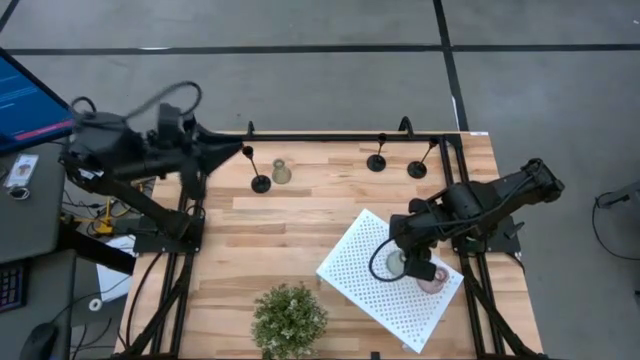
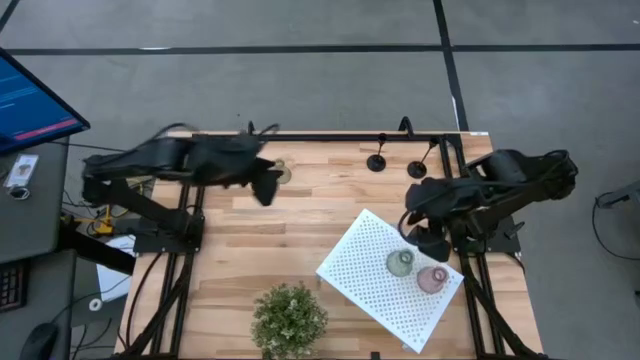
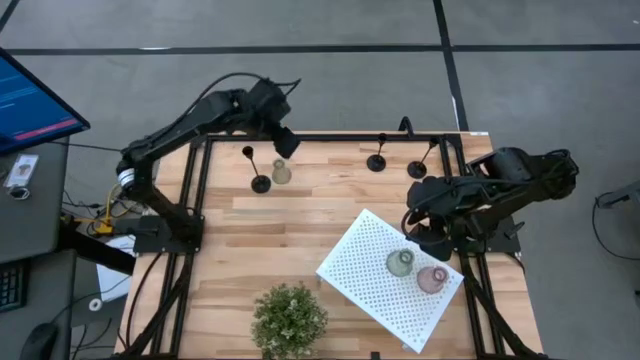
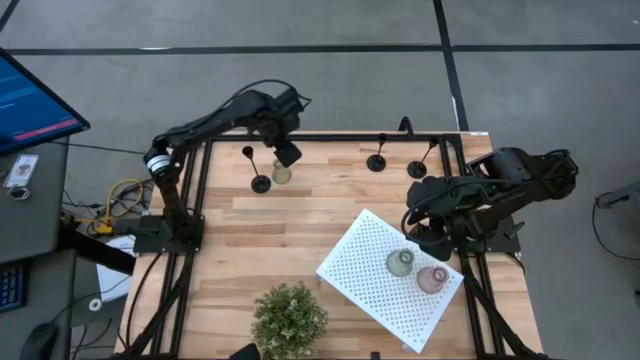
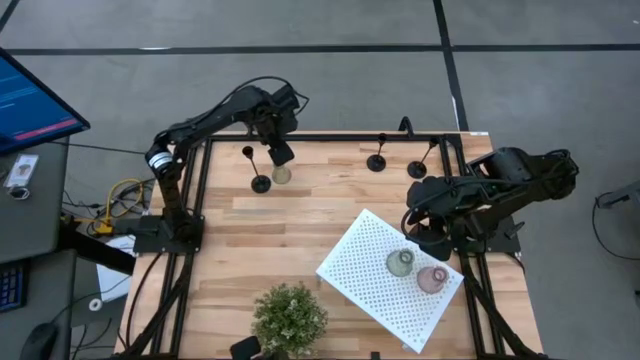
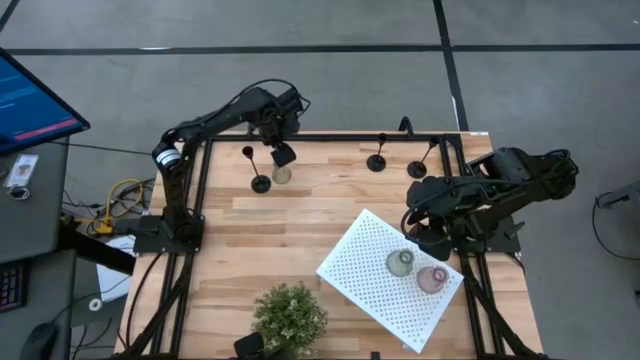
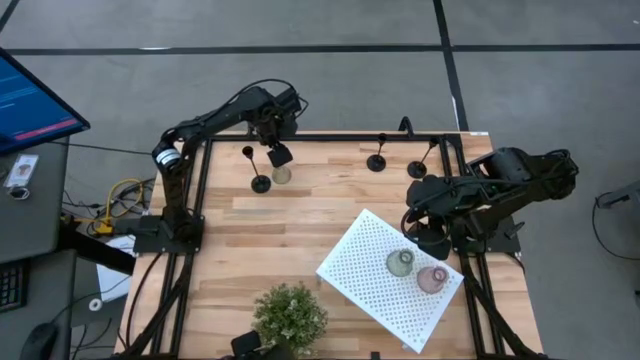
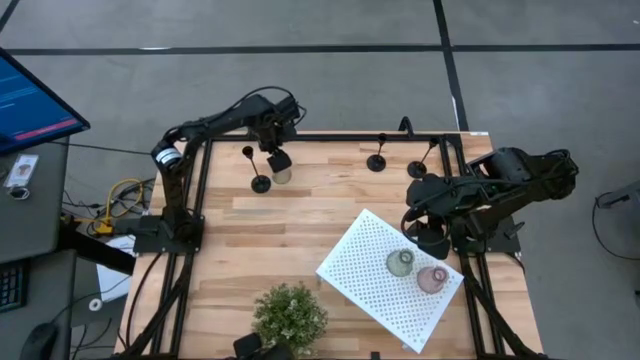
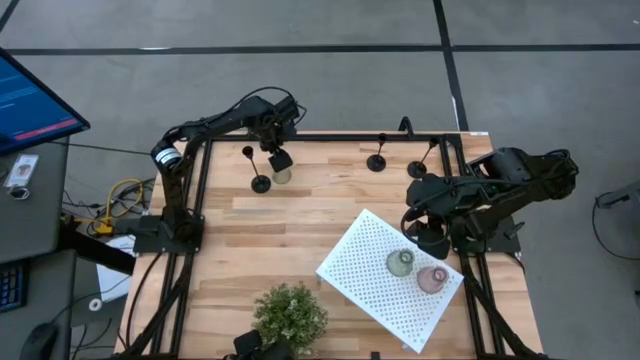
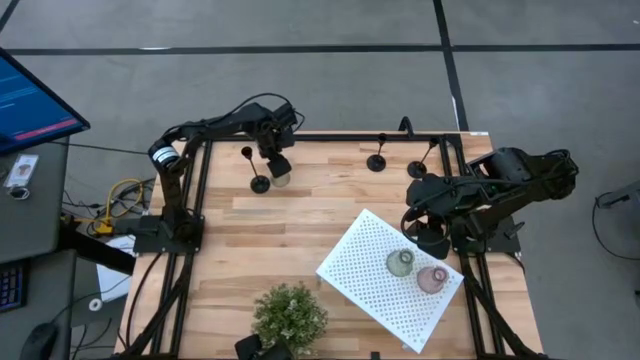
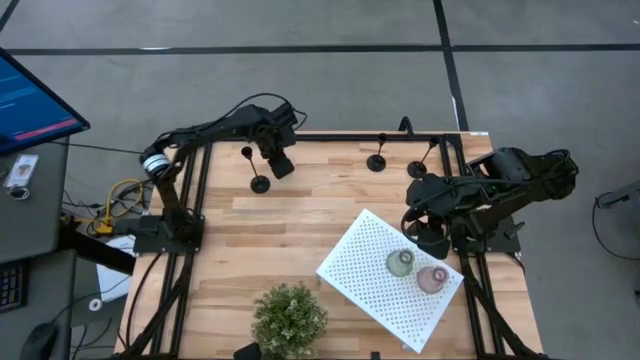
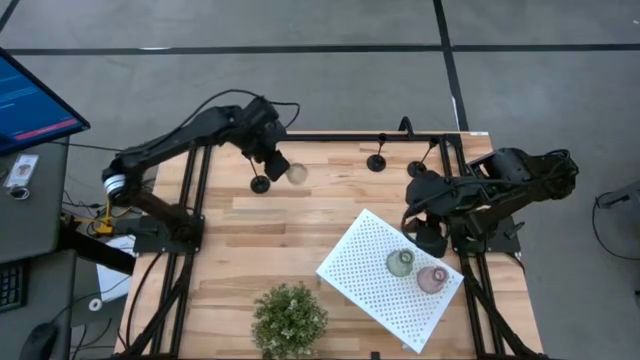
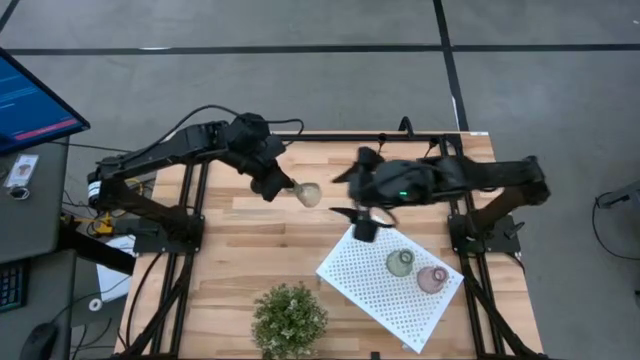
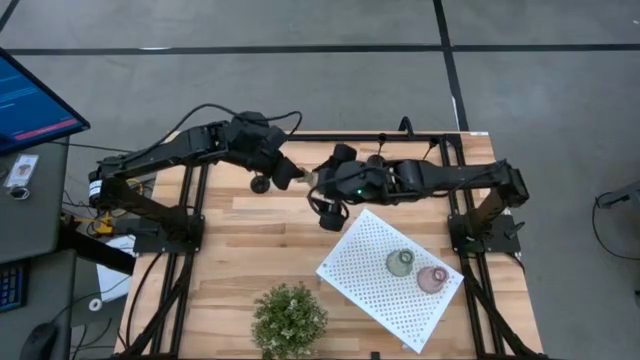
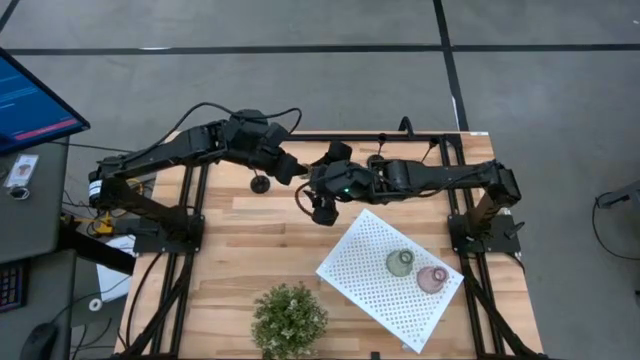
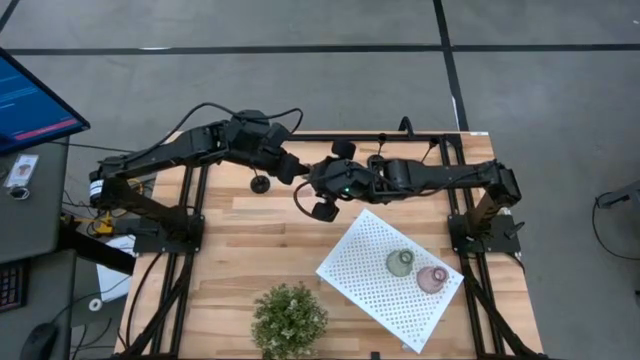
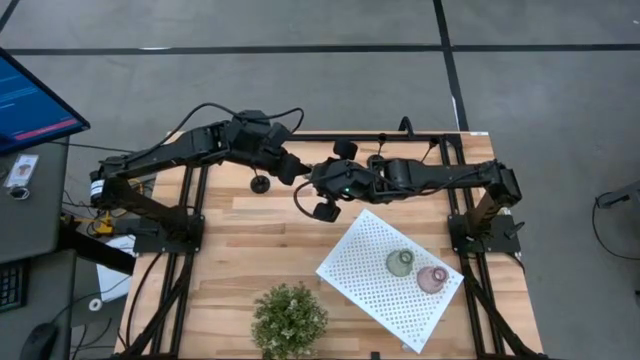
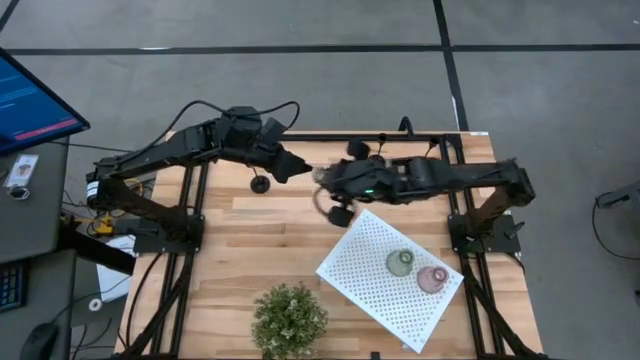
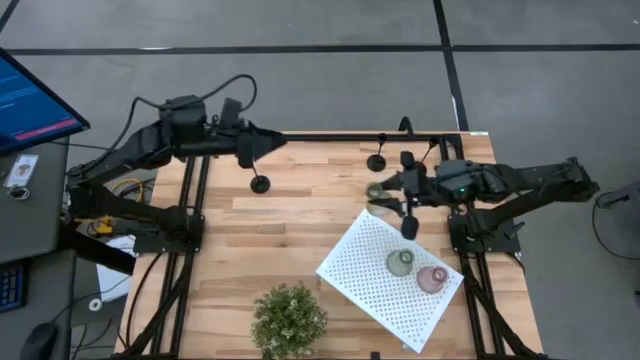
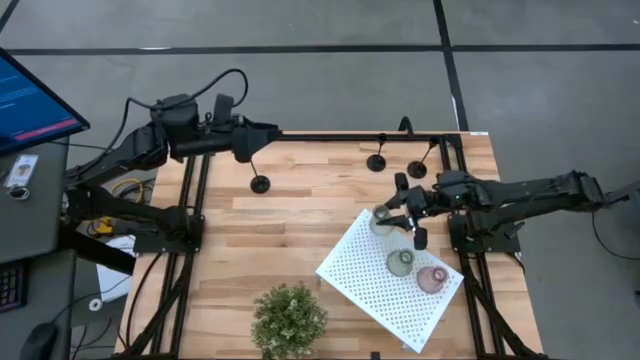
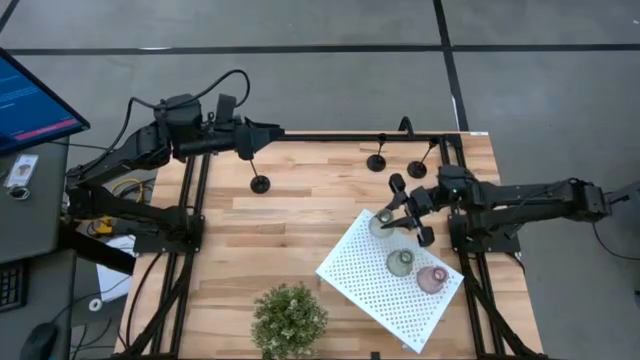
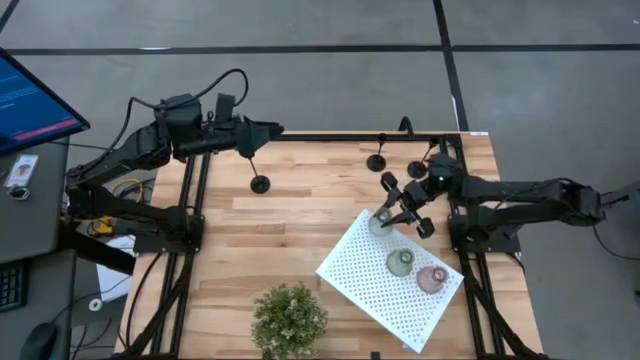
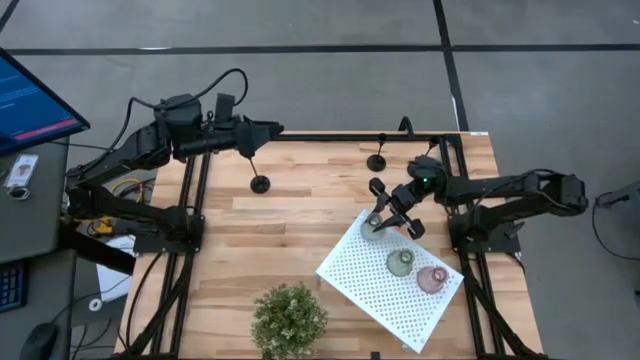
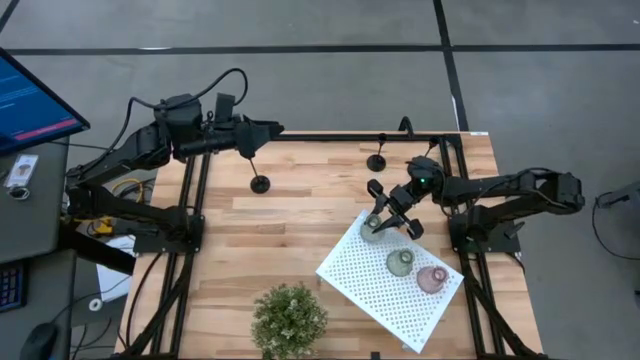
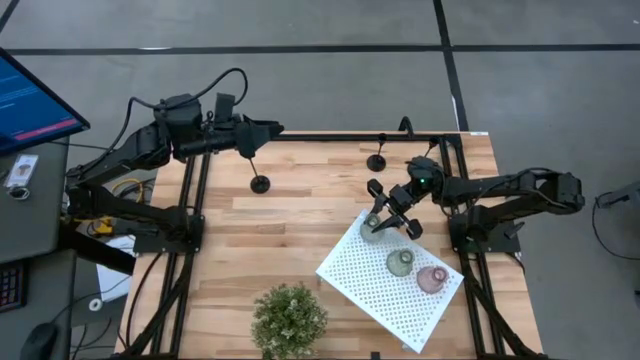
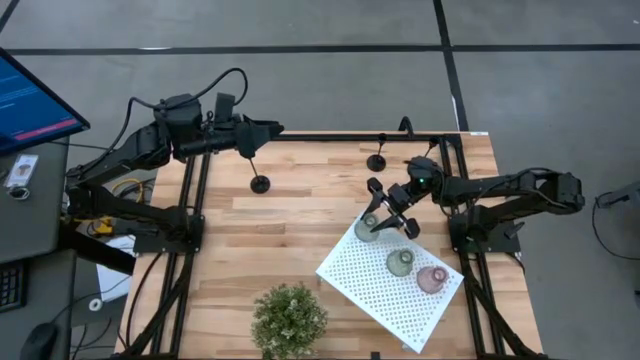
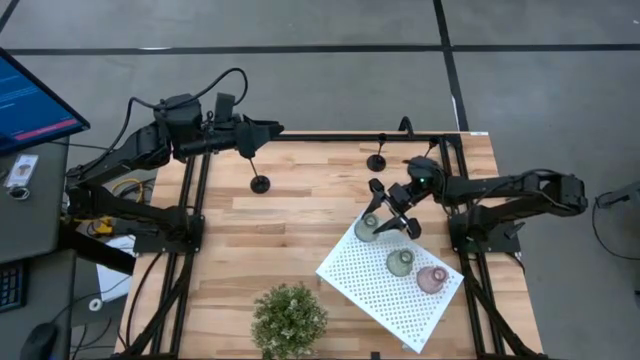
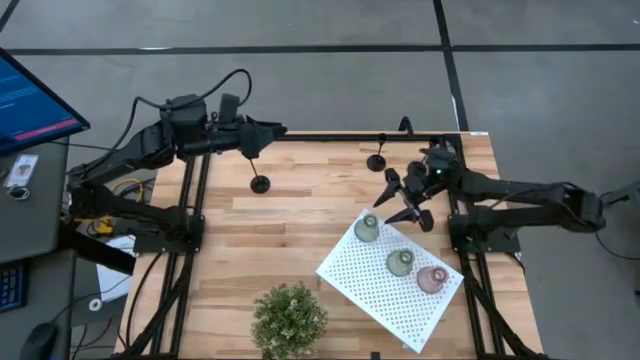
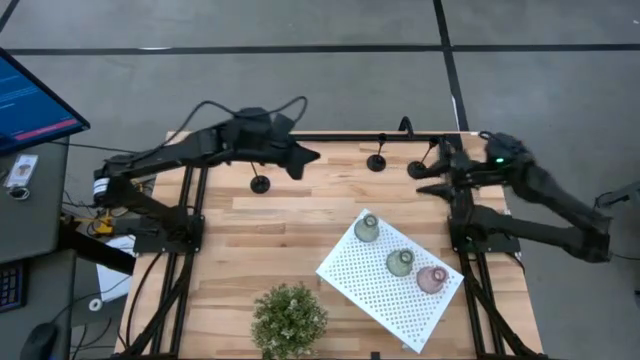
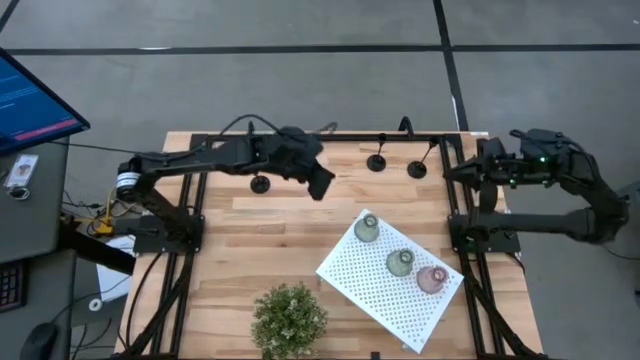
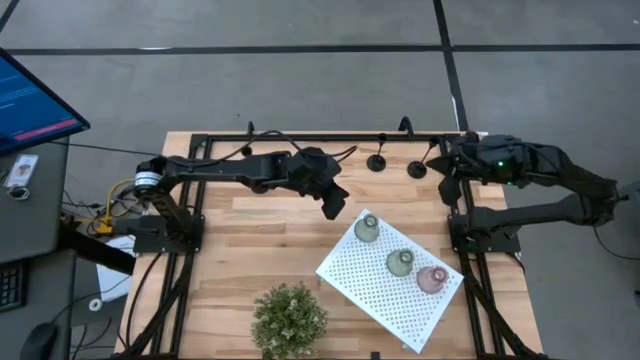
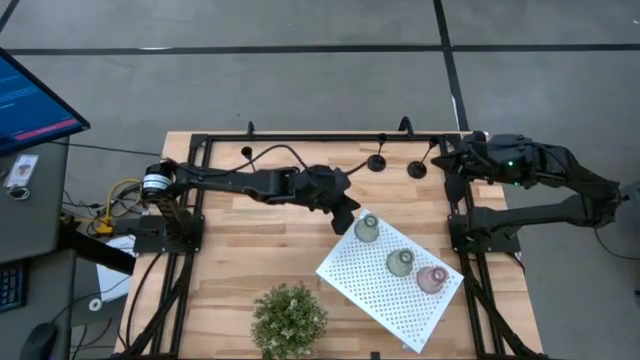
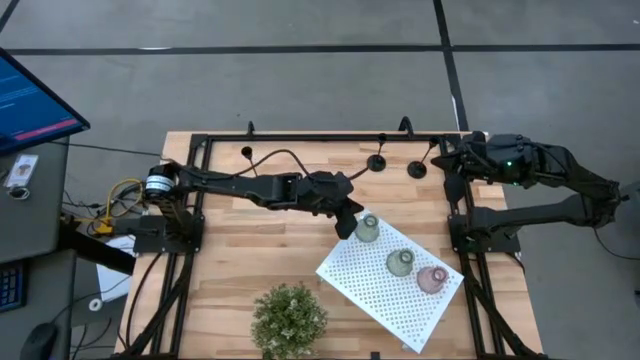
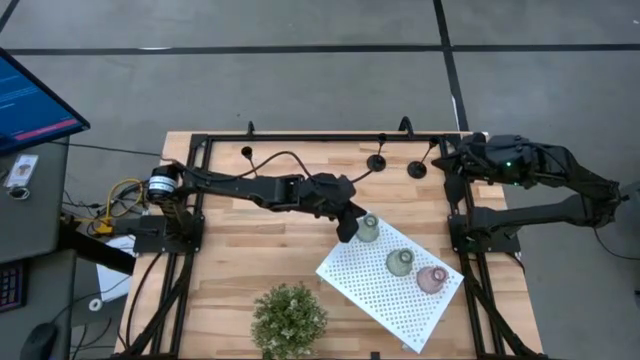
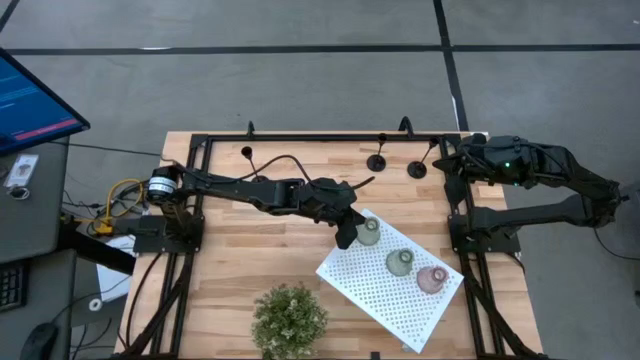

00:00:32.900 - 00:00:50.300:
Task: Pick & Place candle stick holders
Put the green glass candle holder on the shelf aligned with green glass candle holders
